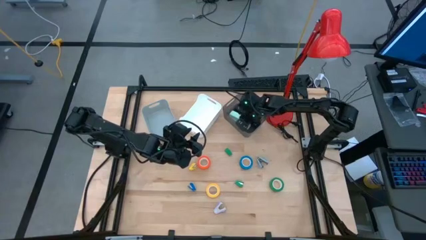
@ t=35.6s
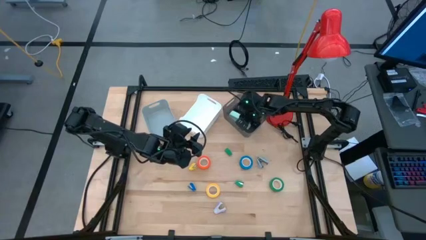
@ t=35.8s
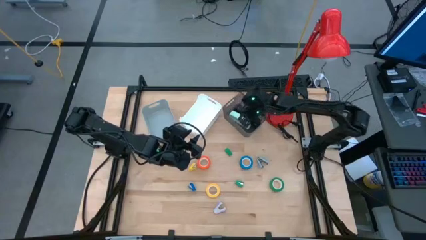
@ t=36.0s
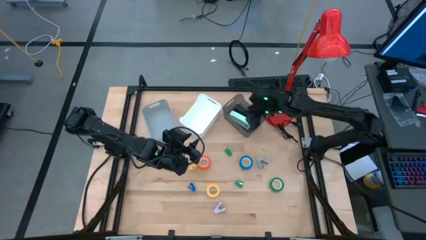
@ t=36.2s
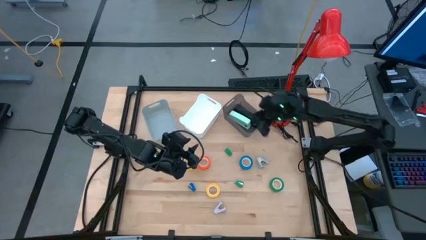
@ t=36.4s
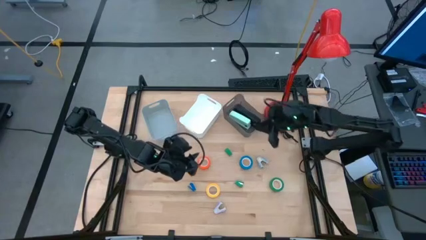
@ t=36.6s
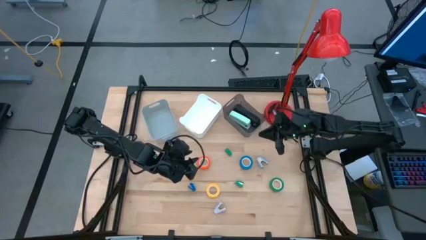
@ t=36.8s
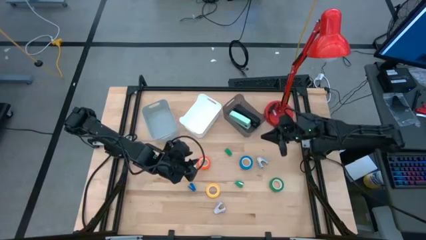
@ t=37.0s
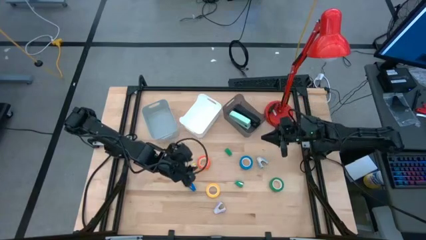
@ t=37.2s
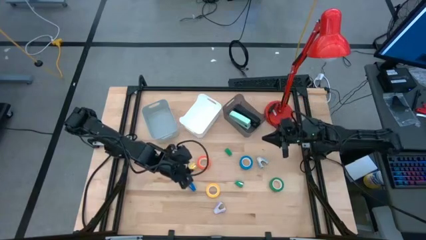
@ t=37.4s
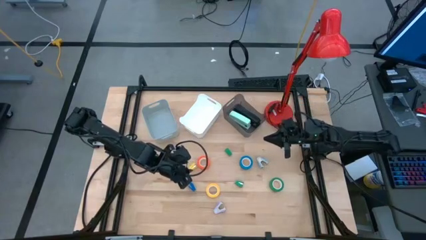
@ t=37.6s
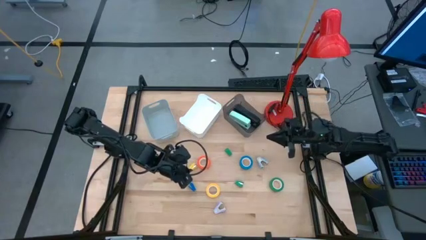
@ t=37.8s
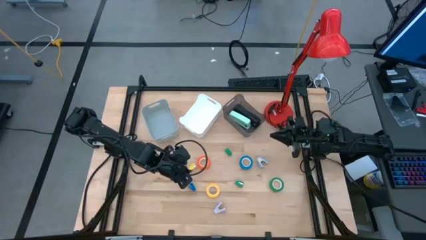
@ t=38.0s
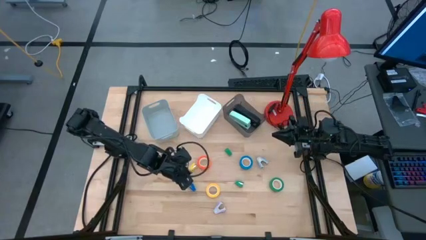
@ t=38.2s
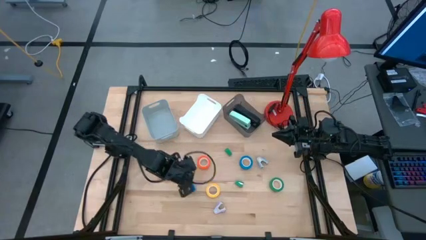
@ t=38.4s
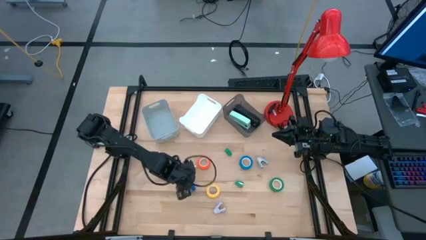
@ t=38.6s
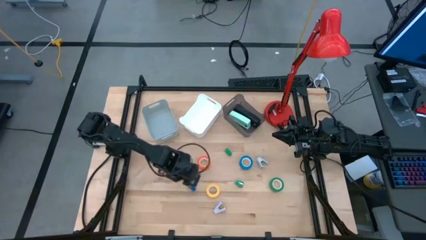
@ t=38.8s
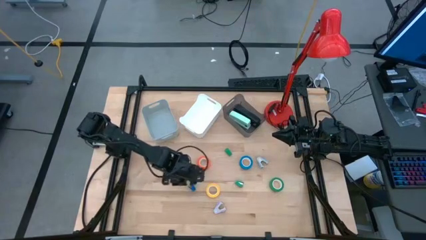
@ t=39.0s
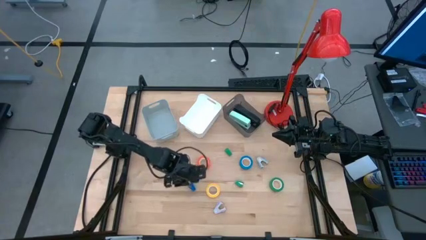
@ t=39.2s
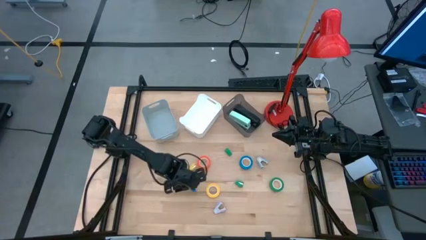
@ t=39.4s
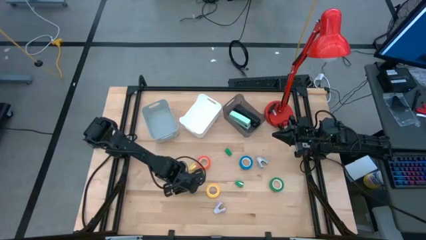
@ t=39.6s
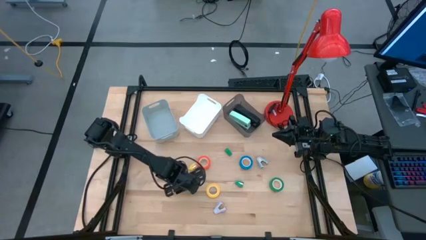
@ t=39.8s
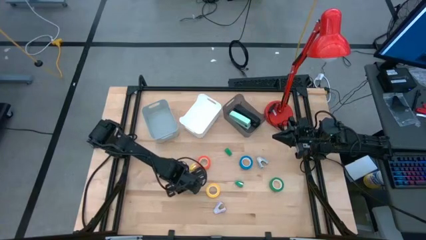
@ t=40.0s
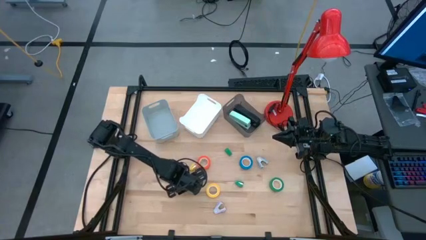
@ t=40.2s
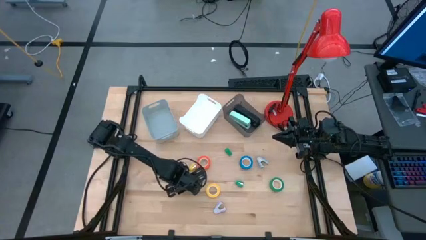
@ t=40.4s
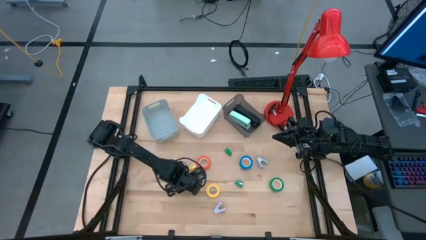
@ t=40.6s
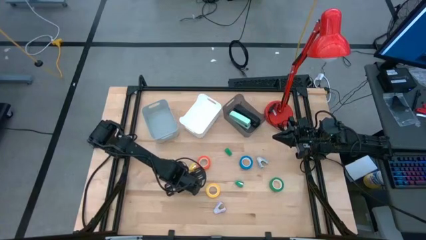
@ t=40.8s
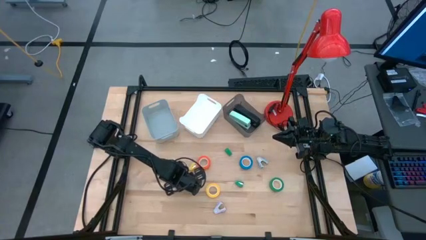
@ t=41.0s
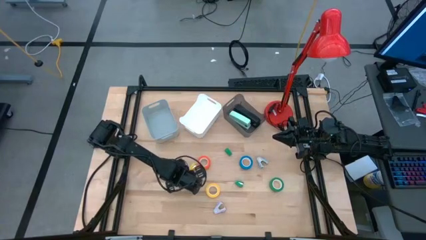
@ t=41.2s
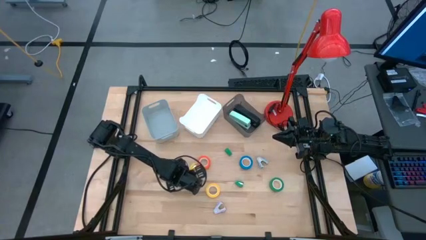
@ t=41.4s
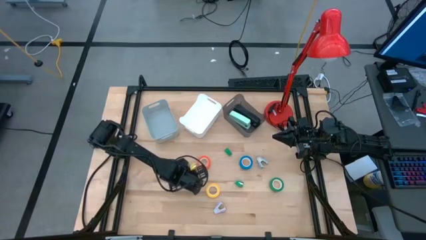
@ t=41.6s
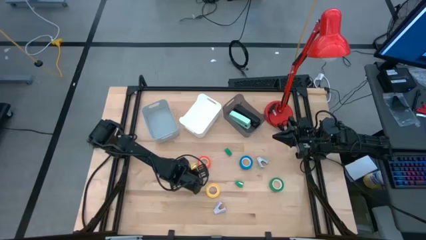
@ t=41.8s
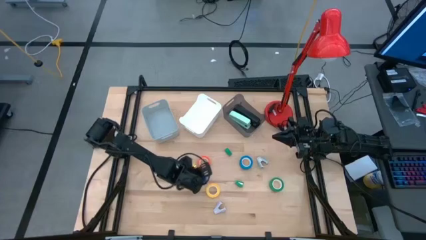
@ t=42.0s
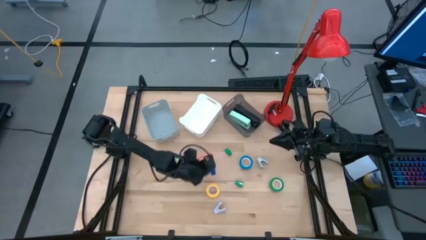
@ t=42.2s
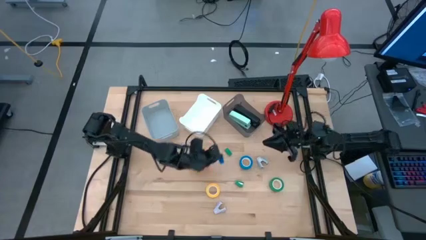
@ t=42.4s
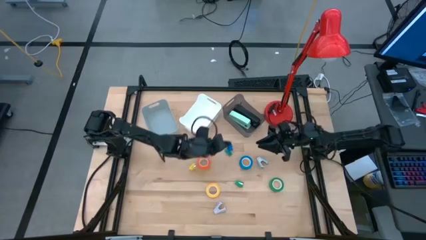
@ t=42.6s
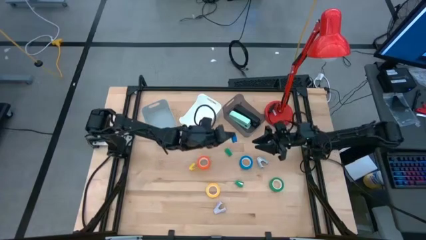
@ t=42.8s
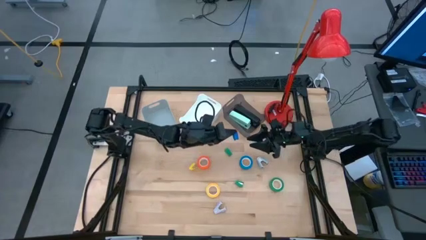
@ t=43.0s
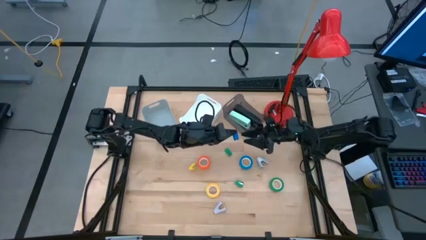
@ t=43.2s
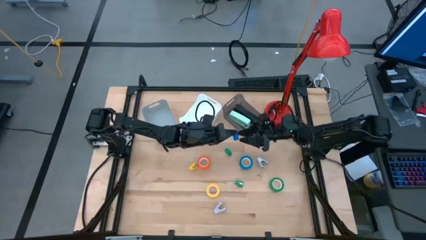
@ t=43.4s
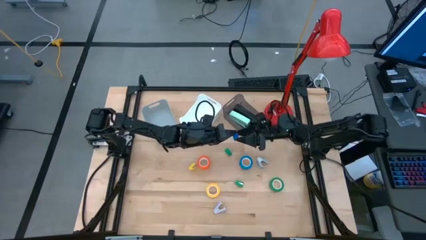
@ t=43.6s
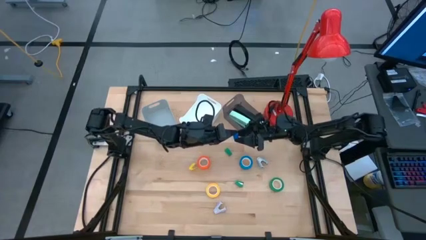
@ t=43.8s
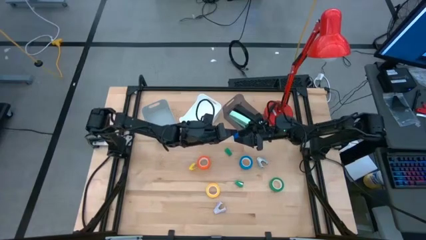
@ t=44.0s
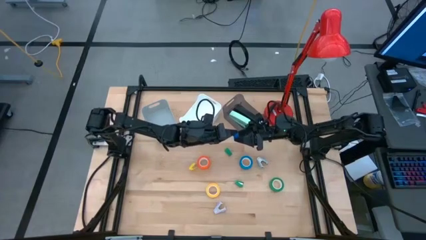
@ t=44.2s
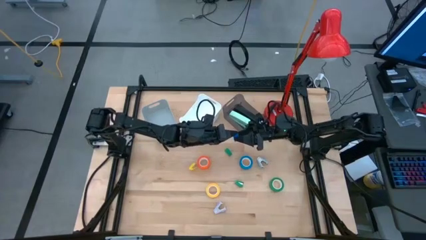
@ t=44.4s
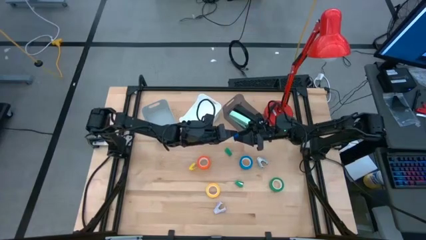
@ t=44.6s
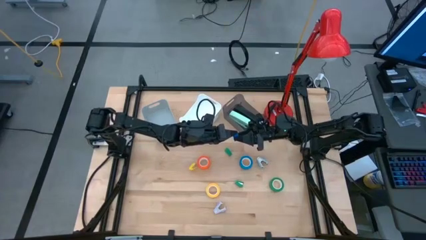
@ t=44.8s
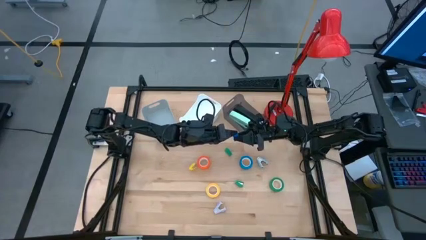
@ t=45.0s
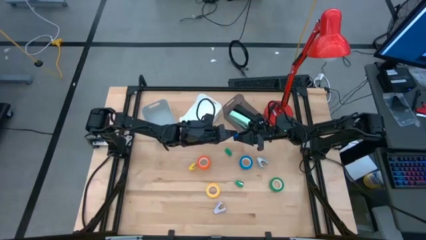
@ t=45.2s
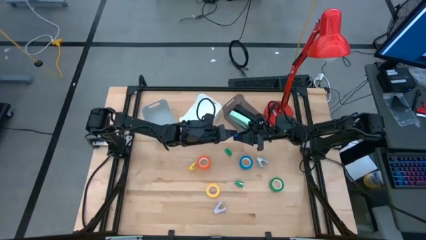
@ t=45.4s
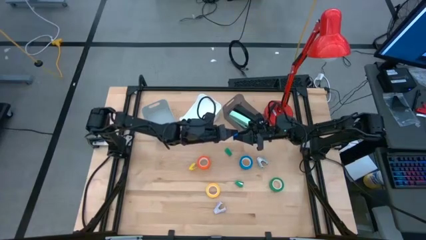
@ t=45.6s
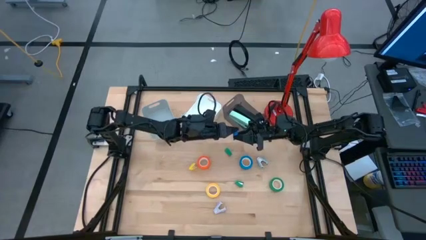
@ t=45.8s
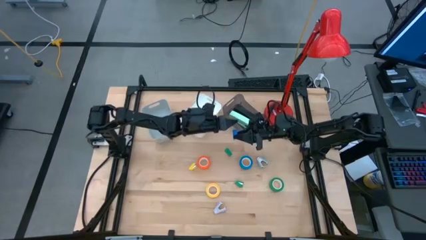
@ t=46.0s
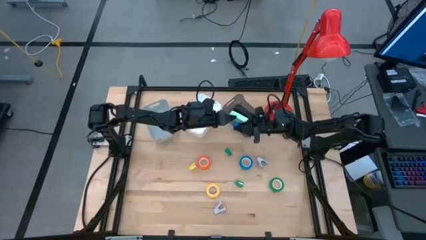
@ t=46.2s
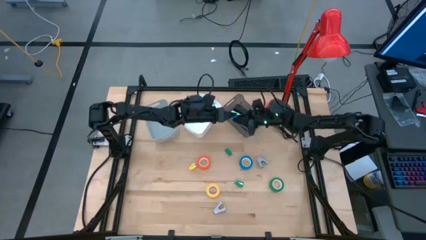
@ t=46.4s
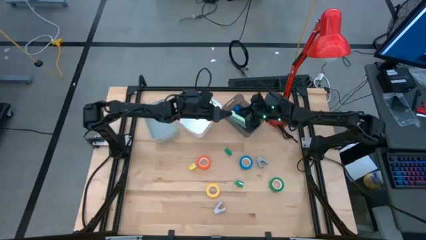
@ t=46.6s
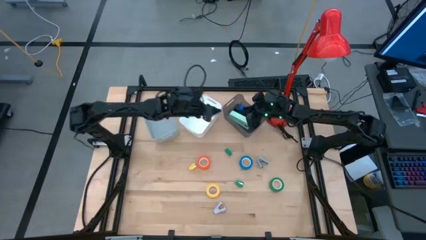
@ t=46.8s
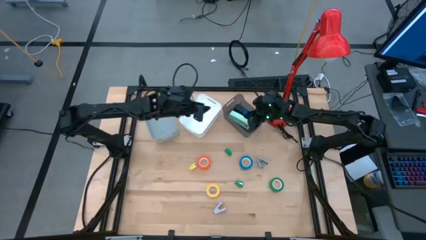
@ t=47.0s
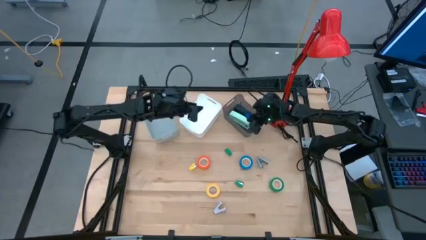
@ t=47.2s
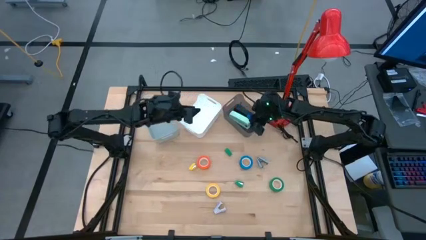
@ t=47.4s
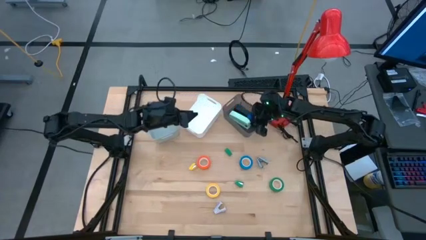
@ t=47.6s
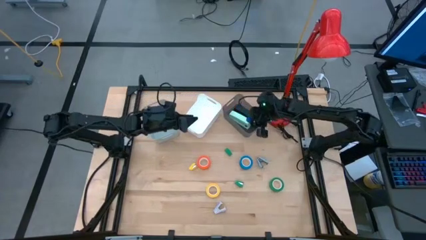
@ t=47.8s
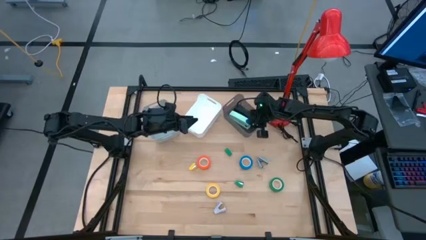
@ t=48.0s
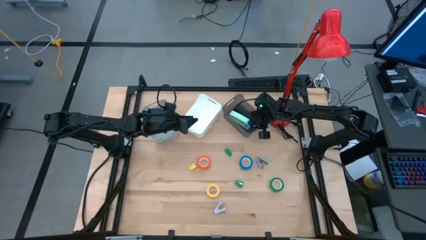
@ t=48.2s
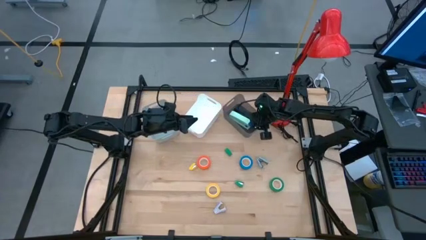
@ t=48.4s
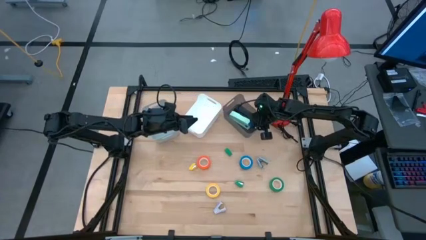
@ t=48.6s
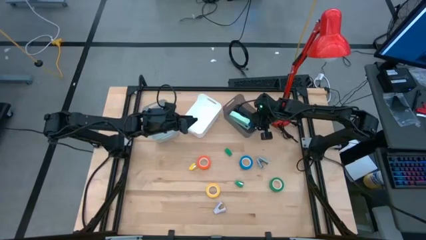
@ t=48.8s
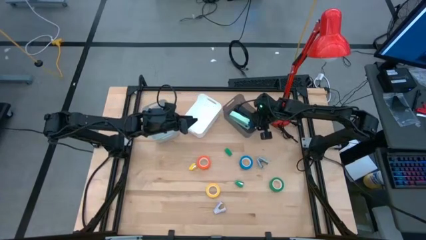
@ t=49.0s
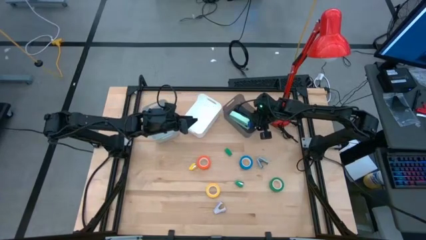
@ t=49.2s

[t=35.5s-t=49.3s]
Task: Pick and place Stapler, Stapler remover, tape
Put the blue stapler into the black bin
